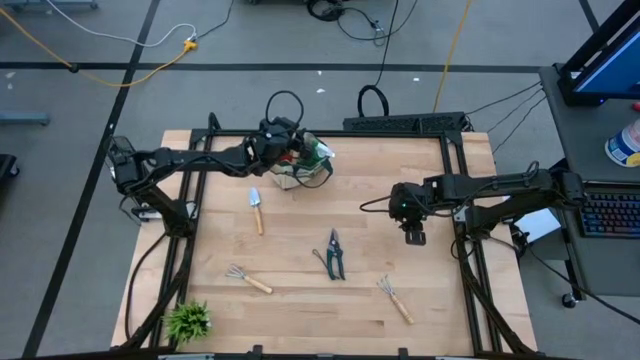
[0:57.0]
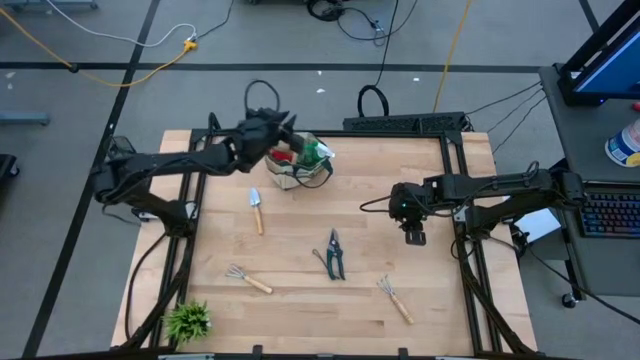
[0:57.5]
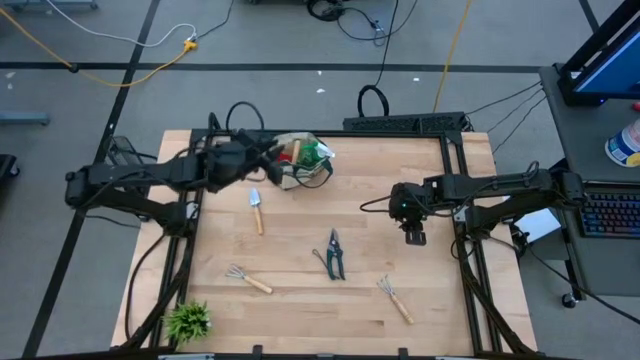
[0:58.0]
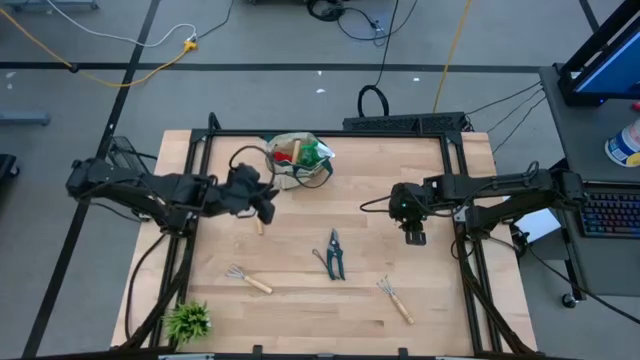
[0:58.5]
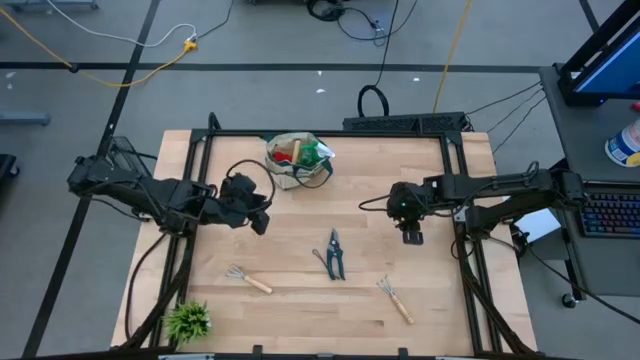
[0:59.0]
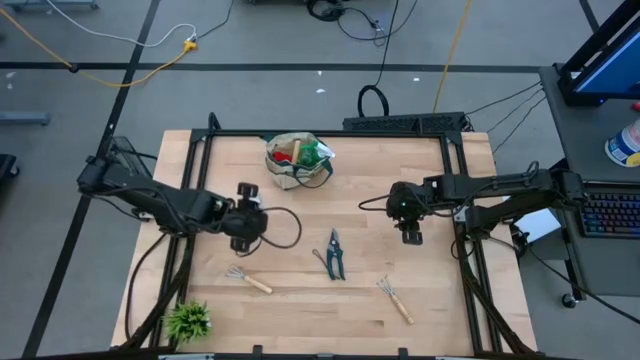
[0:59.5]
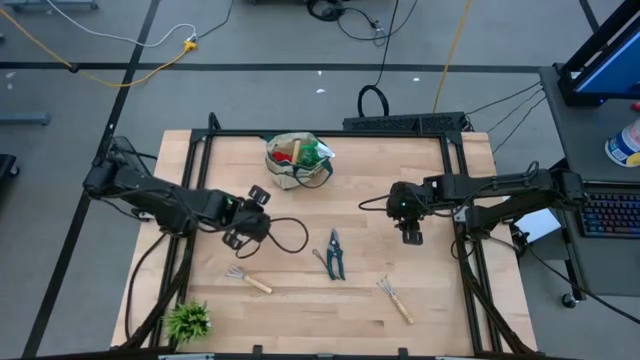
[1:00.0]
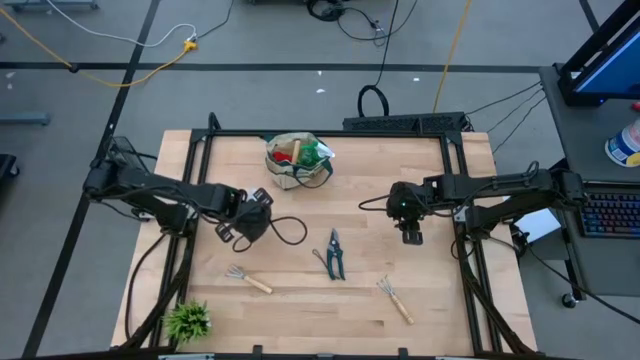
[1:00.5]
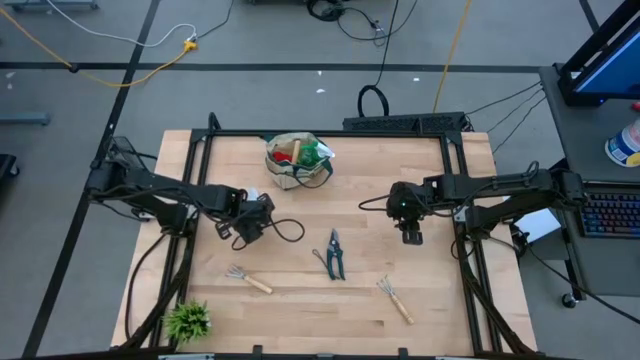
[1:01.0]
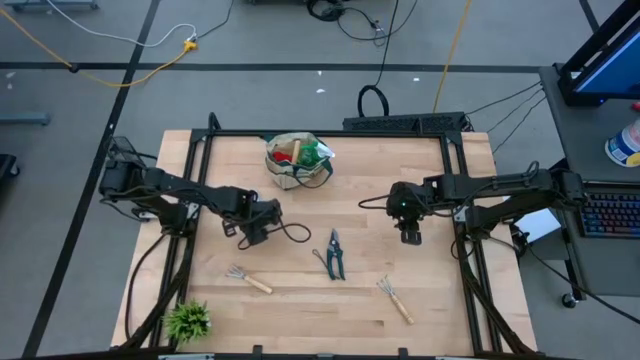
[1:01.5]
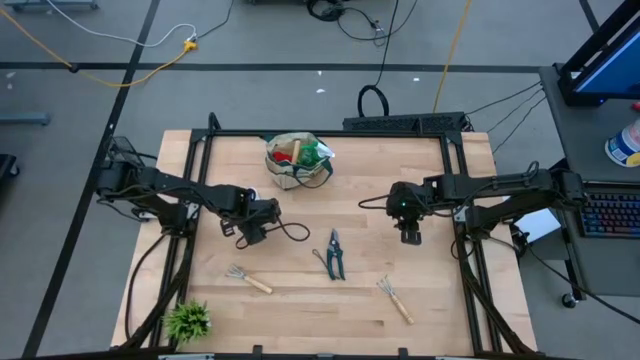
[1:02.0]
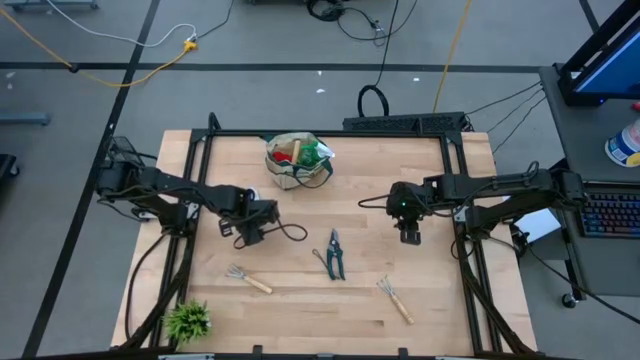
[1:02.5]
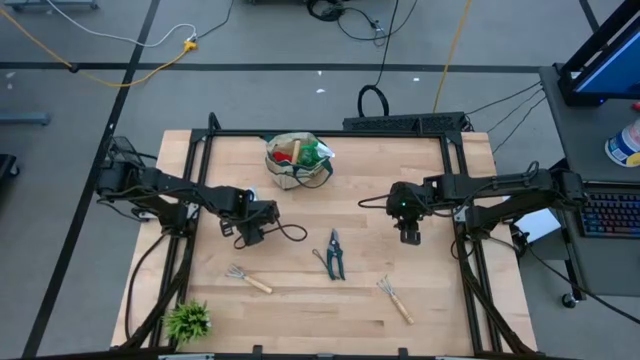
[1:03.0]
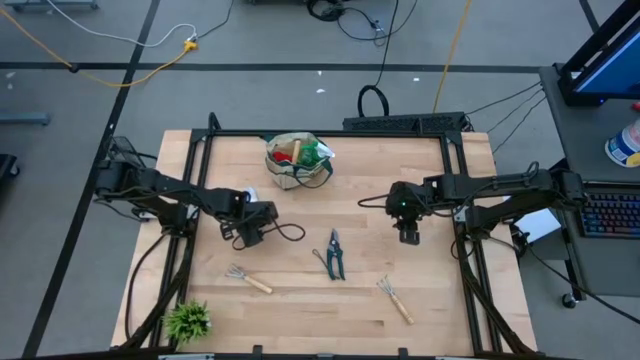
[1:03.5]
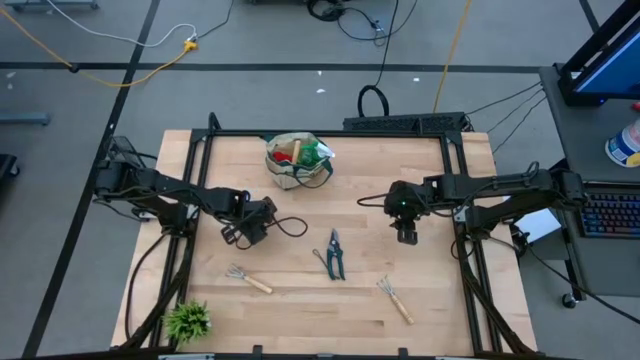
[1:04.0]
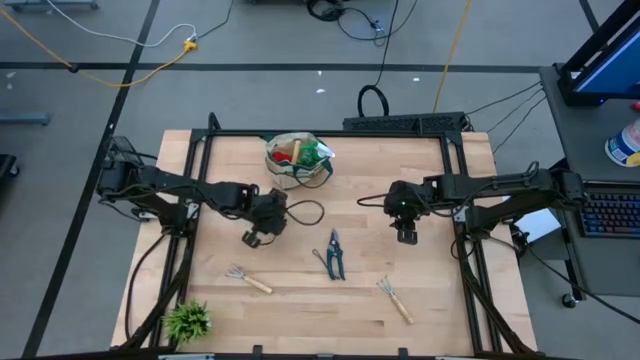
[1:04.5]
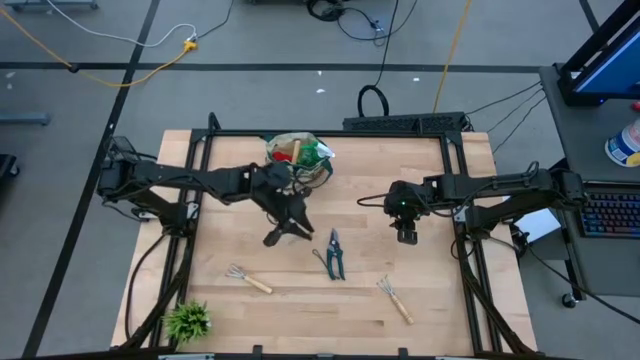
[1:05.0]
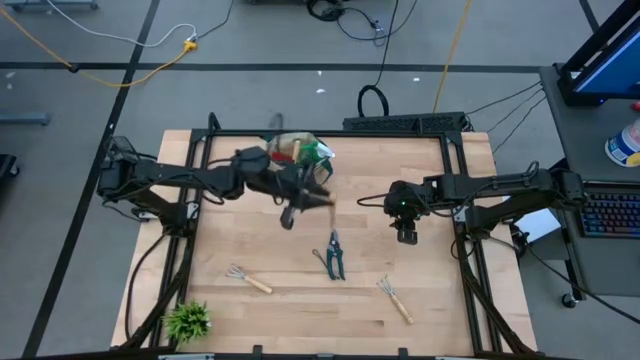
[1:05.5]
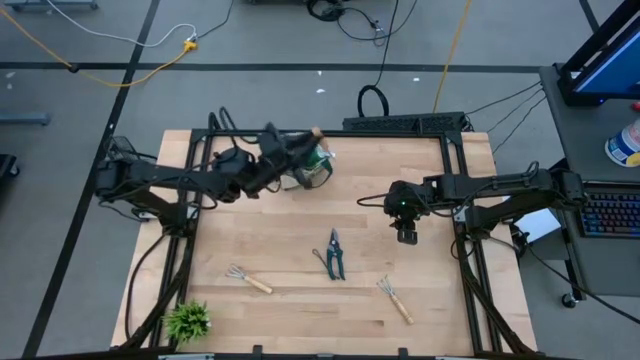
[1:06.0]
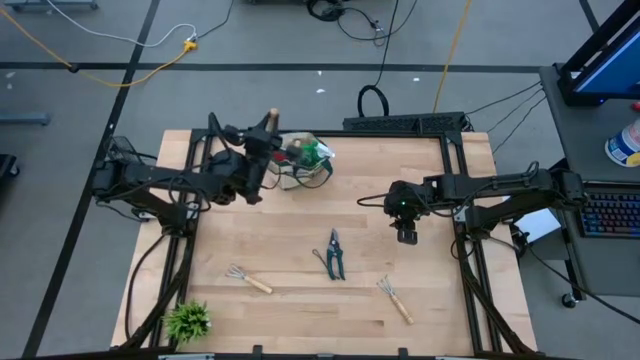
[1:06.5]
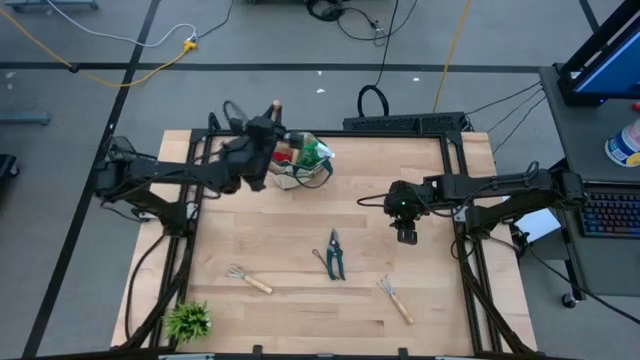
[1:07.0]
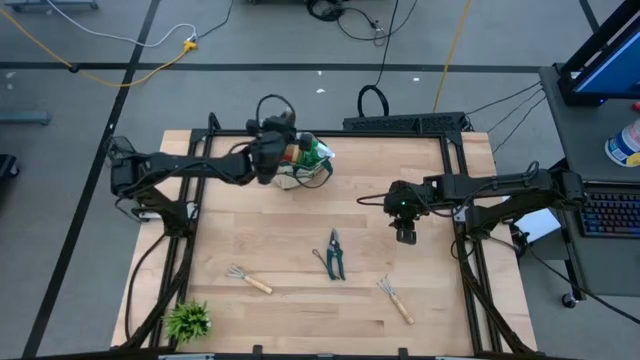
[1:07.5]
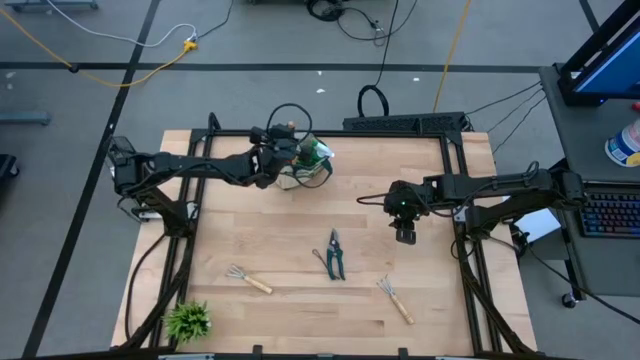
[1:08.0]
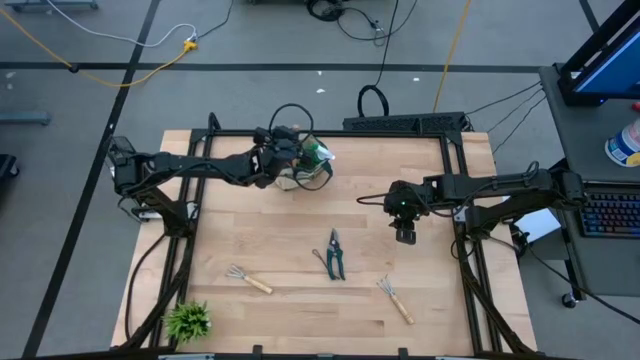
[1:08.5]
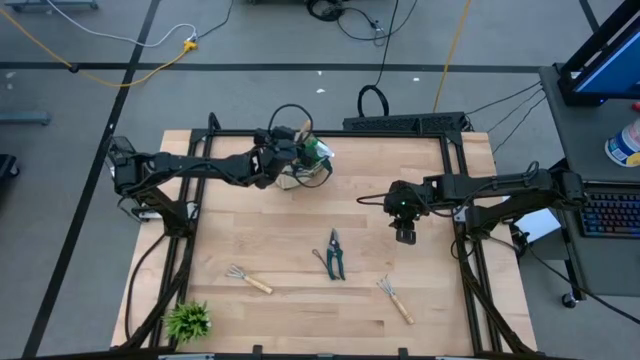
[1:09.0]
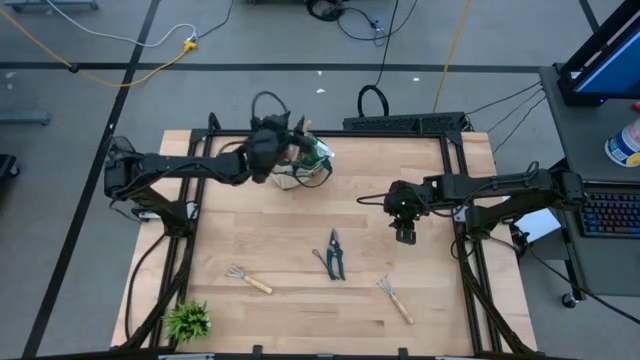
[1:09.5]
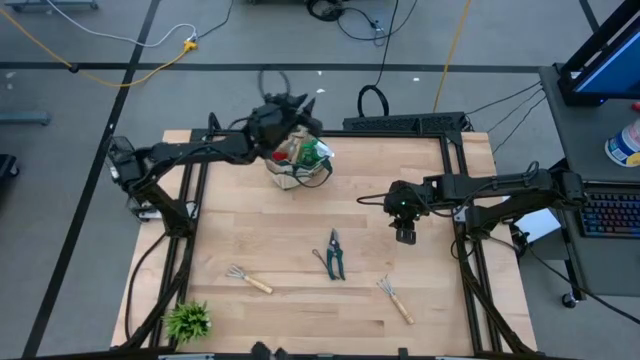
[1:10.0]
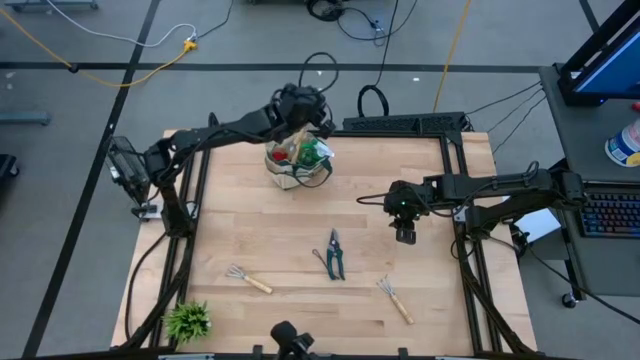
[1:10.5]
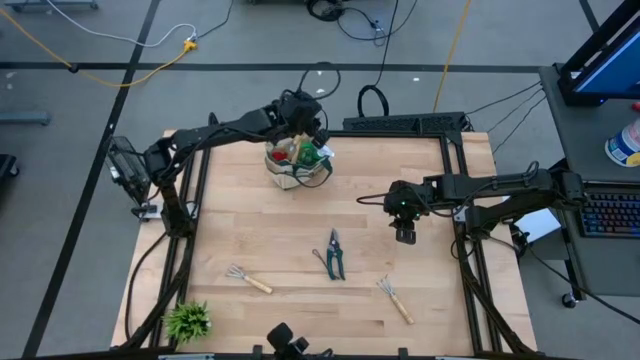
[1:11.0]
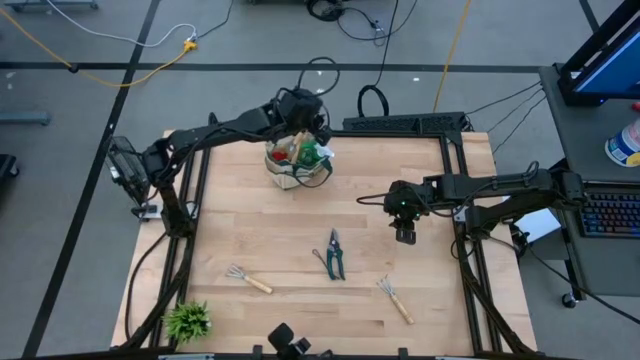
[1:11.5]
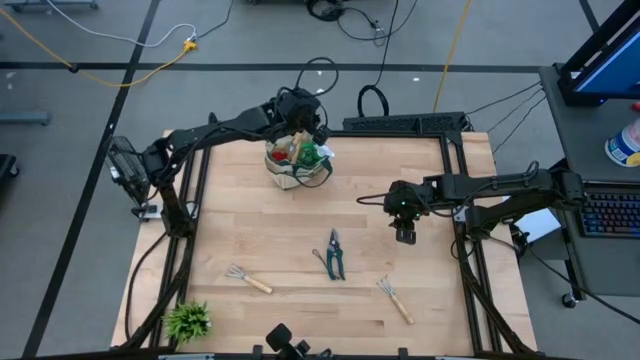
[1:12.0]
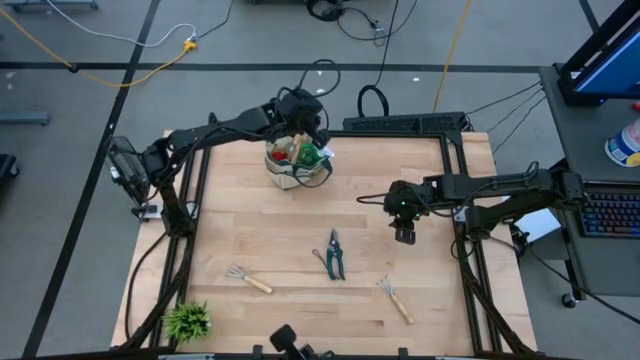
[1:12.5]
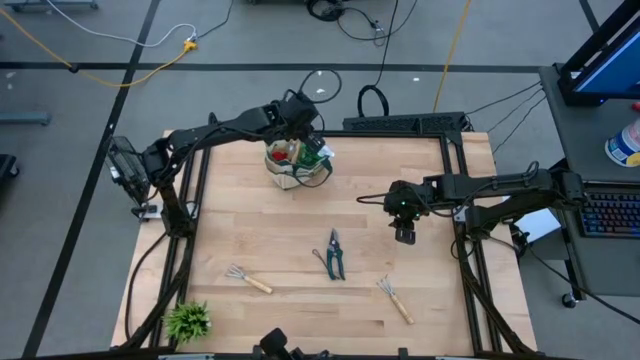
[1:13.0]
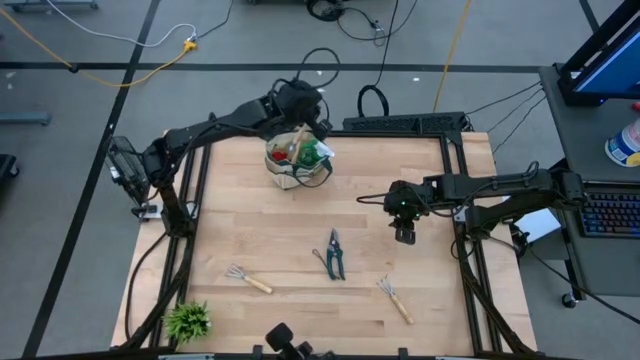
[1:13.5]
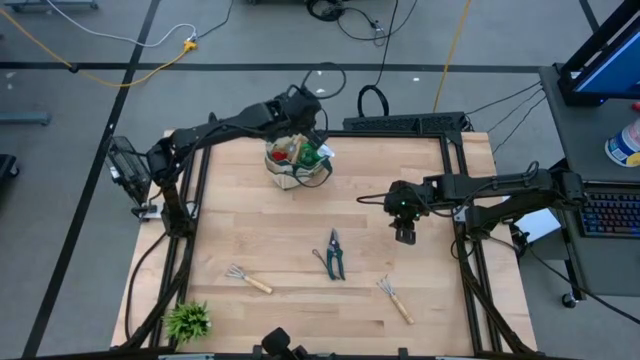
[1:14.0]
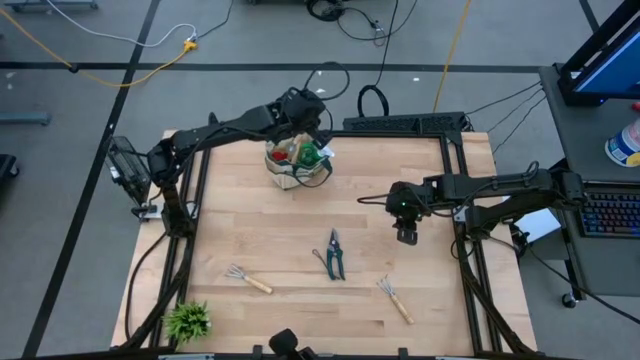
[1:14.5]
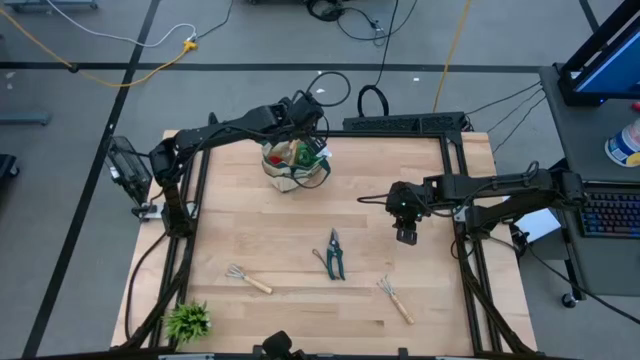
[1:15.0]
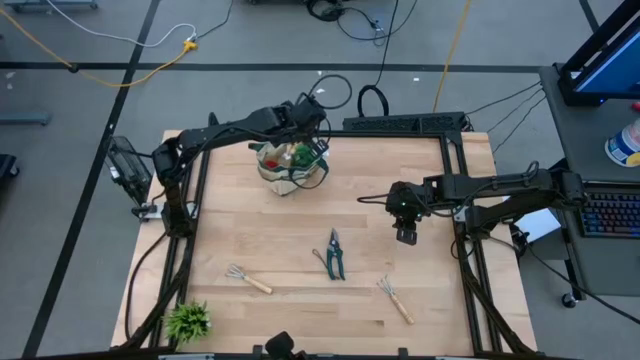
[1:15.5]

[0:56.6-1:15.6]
Task: Pick & Place Garden tools in Gardening bag
Put the trowel into the gardening bag

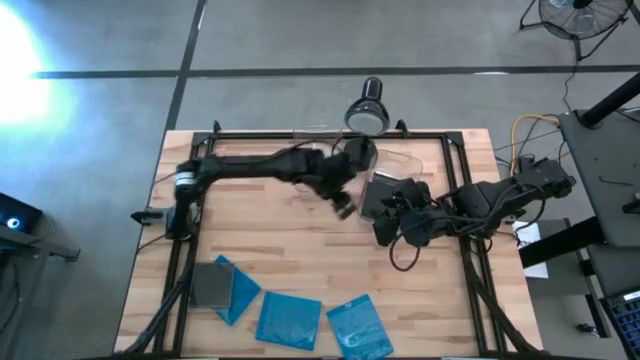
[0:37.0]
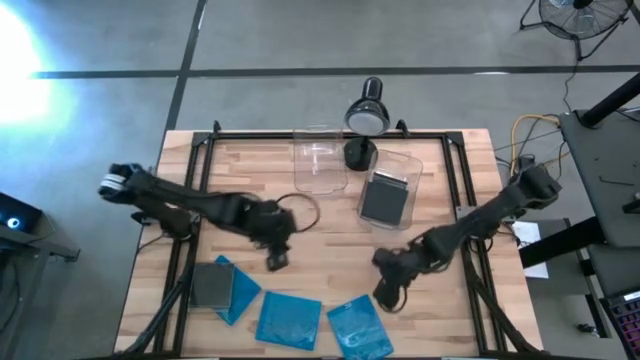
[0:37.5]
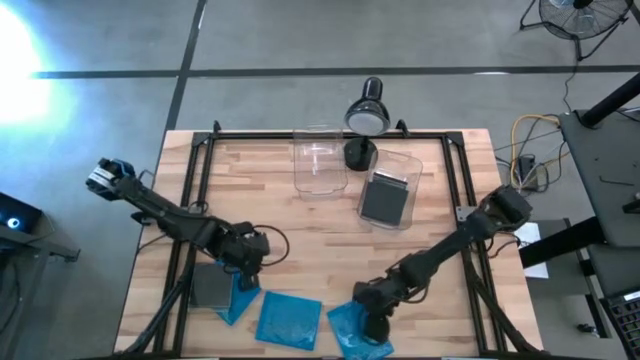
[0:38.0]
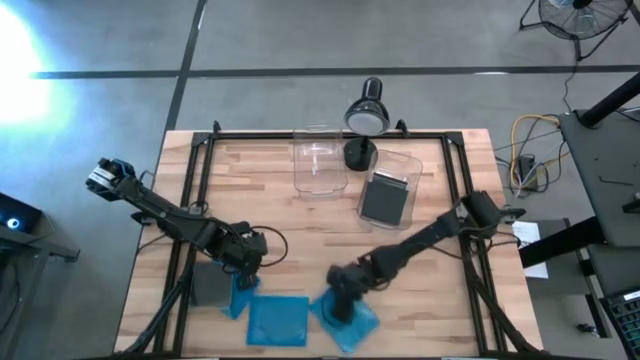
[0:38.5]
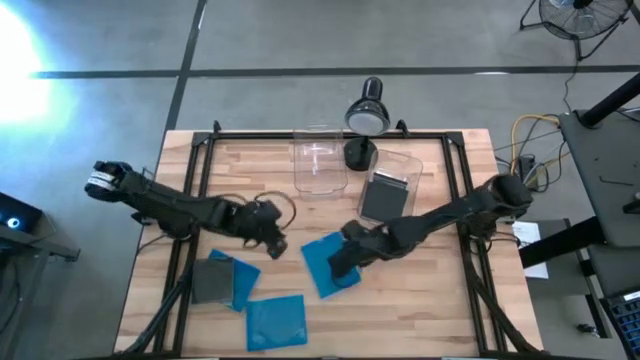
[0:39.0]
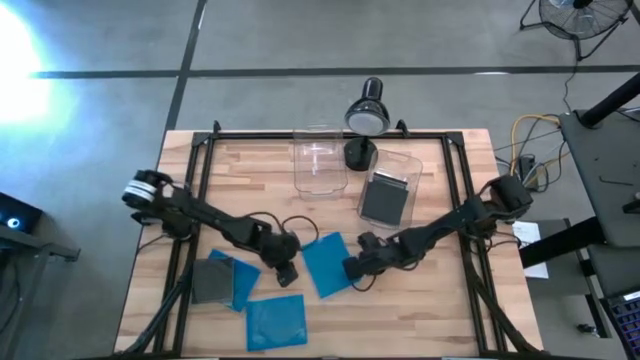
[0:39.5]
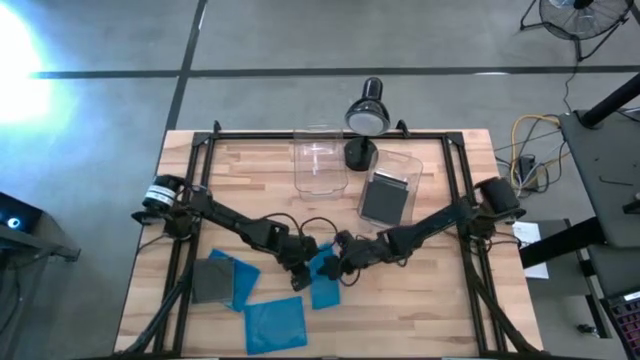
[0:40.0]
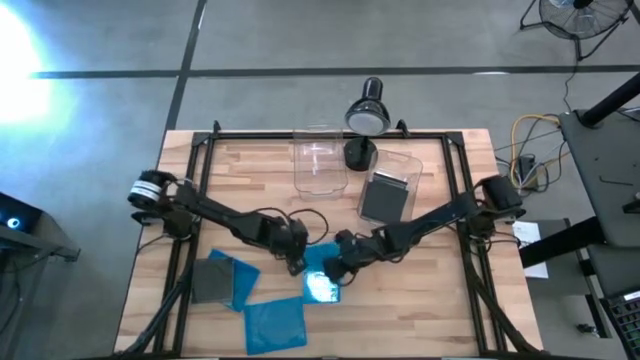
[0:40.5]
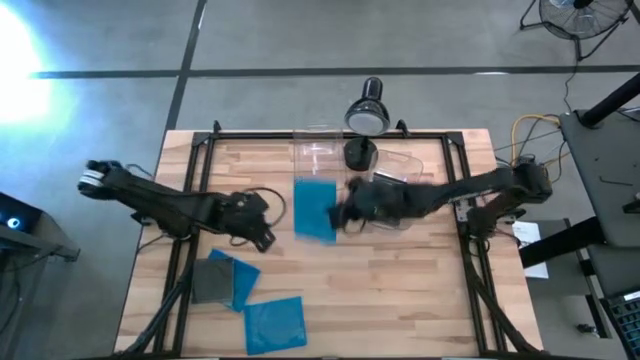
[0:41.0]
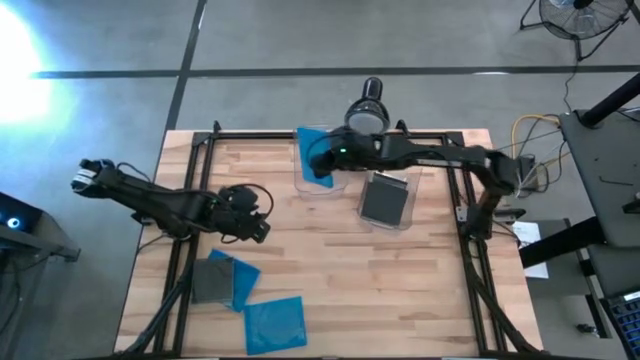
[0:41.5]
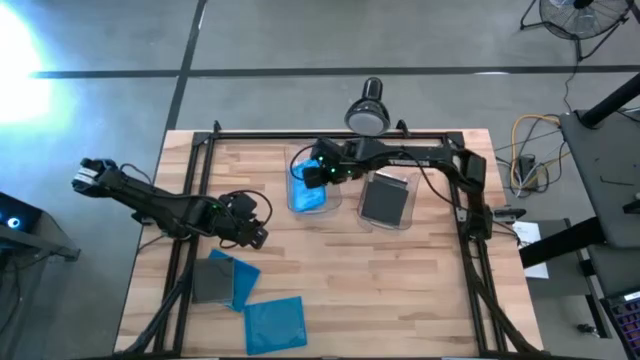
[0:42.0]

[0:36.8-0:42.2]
Task: Pick & place jewel cases by type
Put the blue CD case into the left transparent bin
